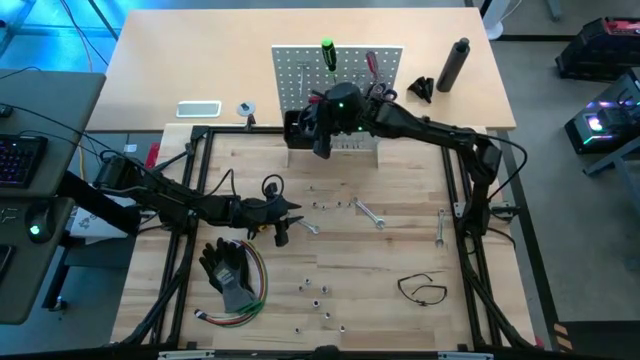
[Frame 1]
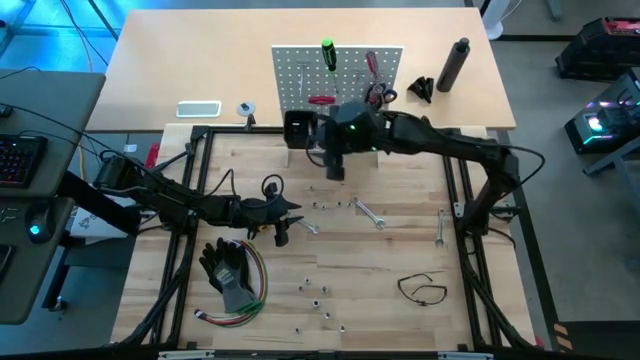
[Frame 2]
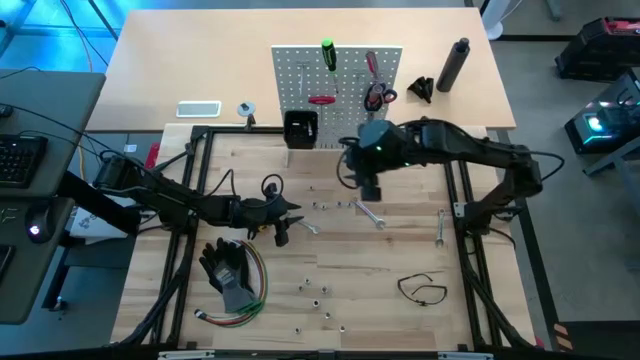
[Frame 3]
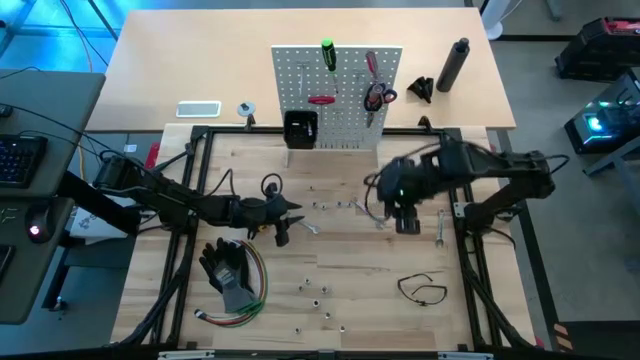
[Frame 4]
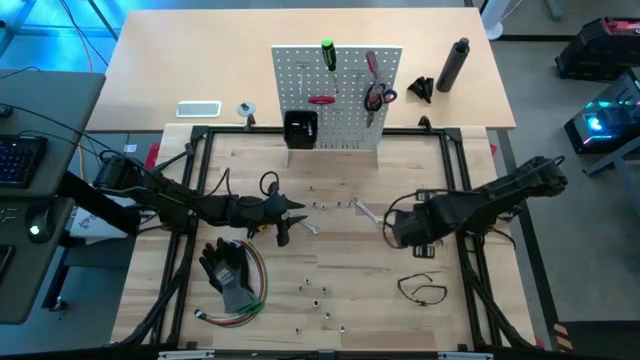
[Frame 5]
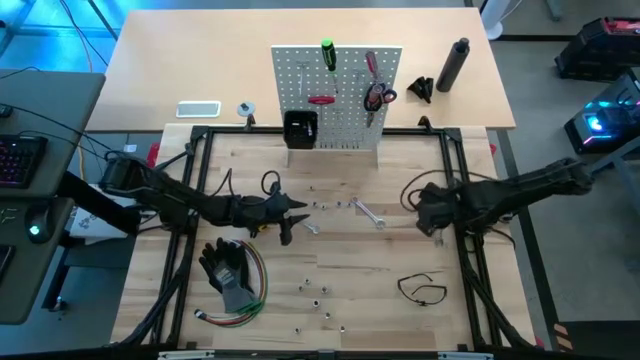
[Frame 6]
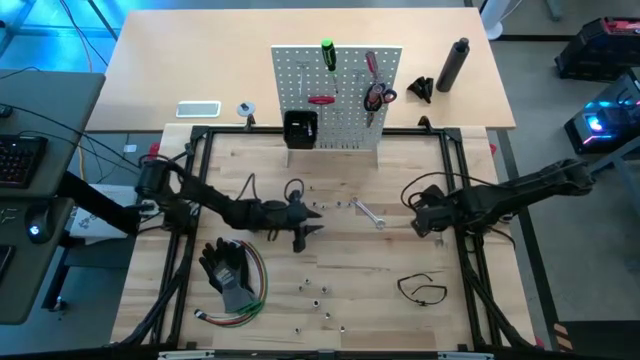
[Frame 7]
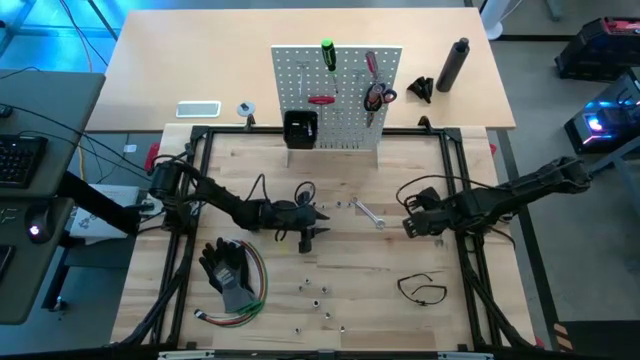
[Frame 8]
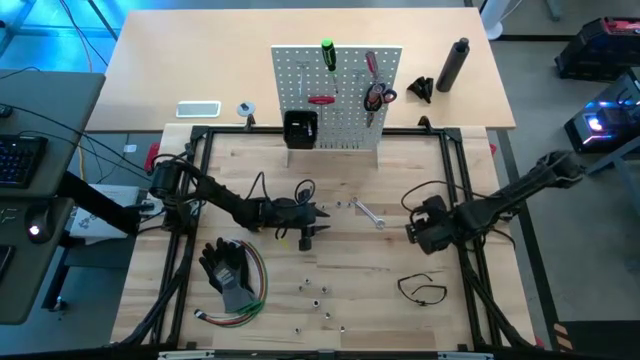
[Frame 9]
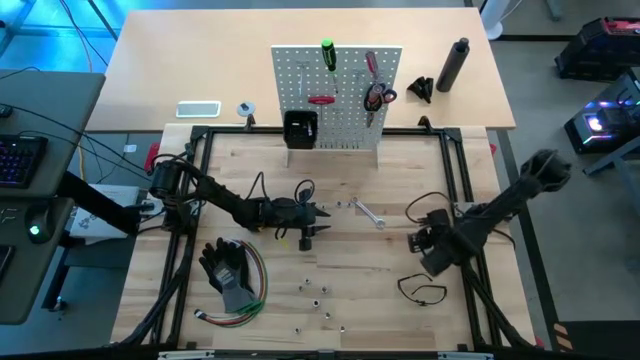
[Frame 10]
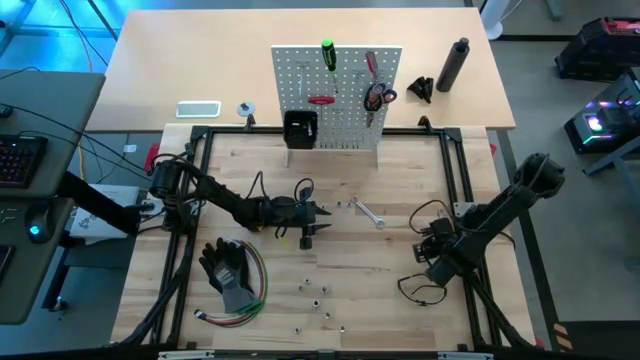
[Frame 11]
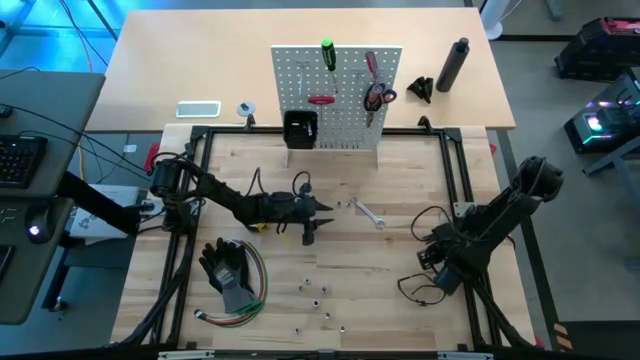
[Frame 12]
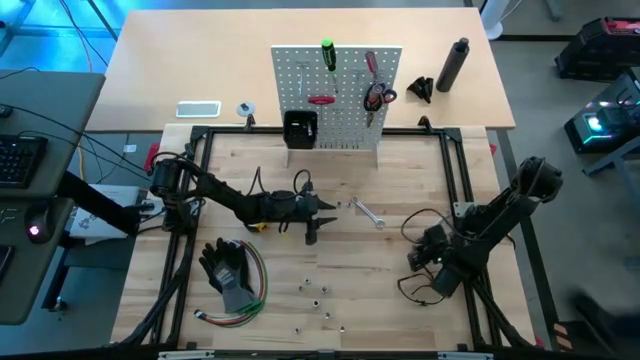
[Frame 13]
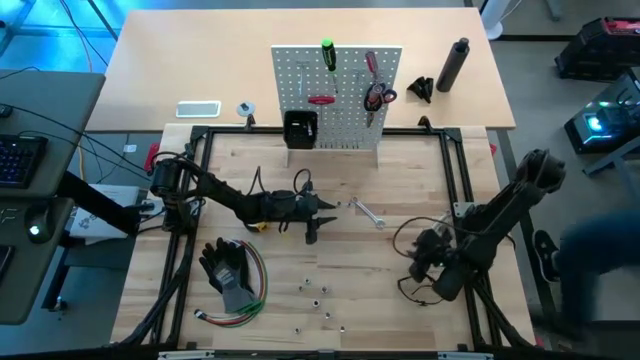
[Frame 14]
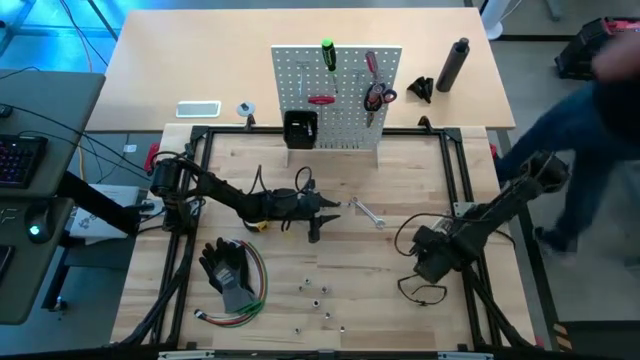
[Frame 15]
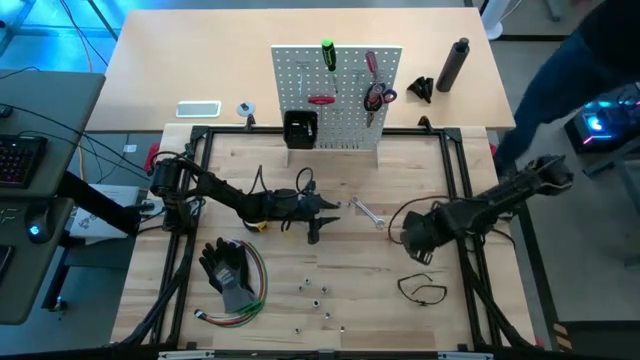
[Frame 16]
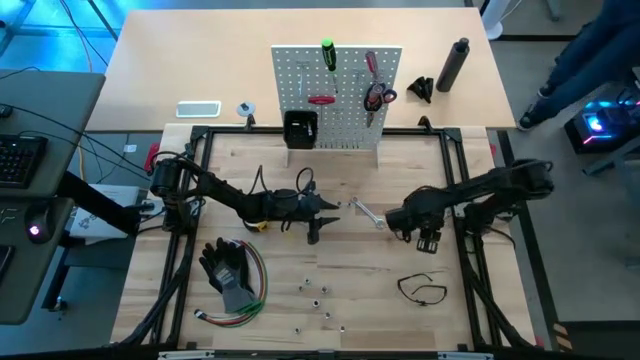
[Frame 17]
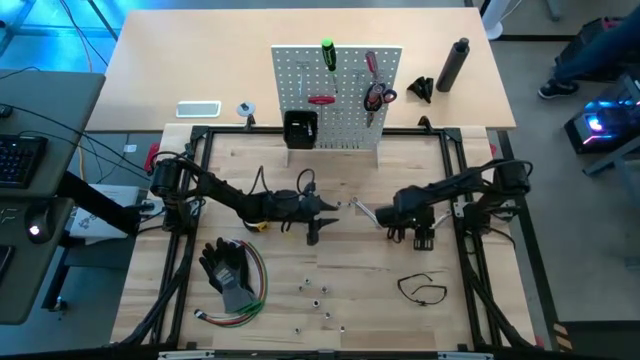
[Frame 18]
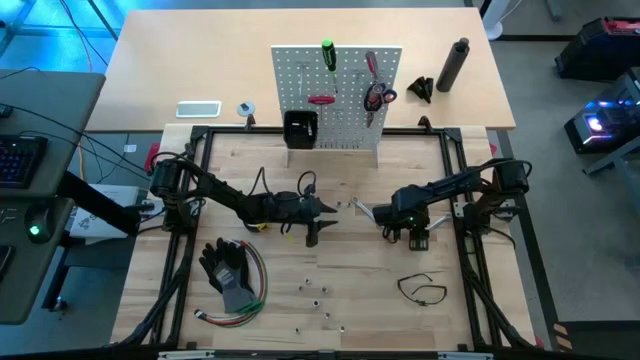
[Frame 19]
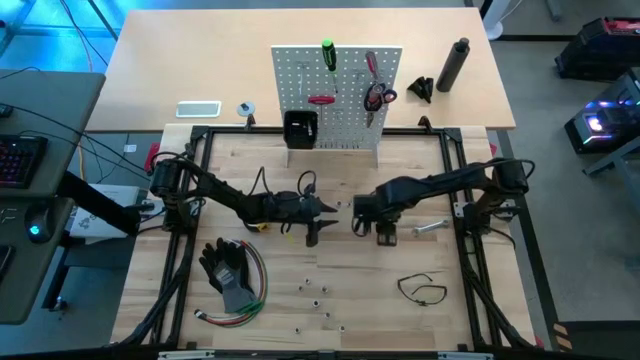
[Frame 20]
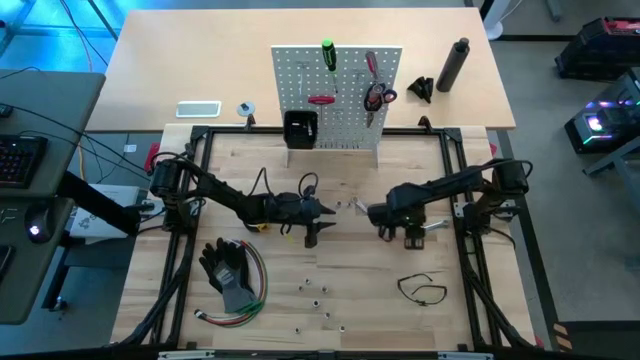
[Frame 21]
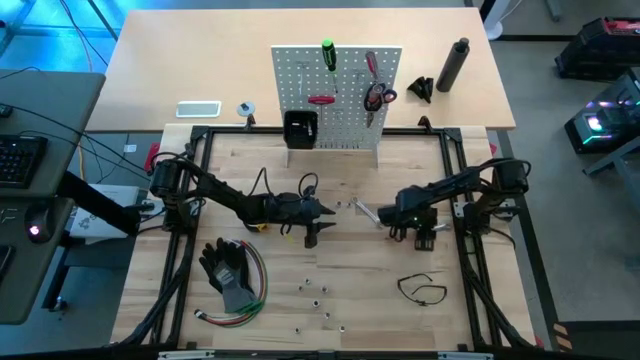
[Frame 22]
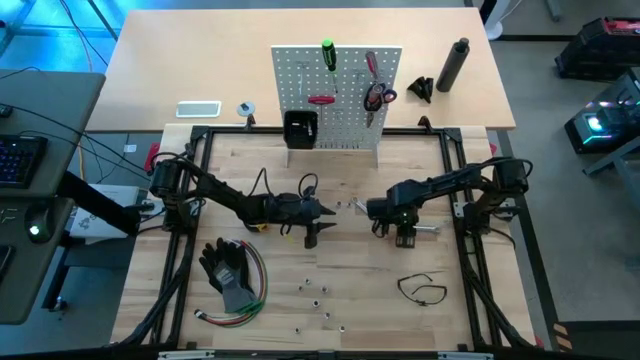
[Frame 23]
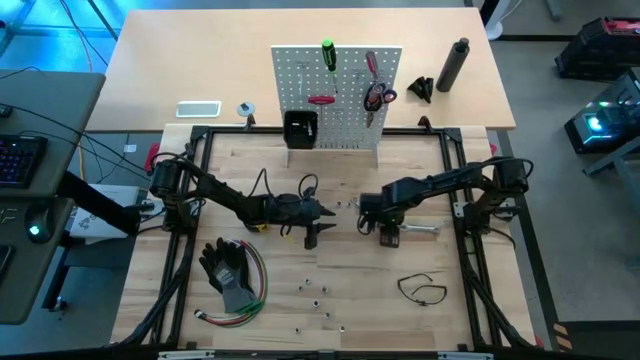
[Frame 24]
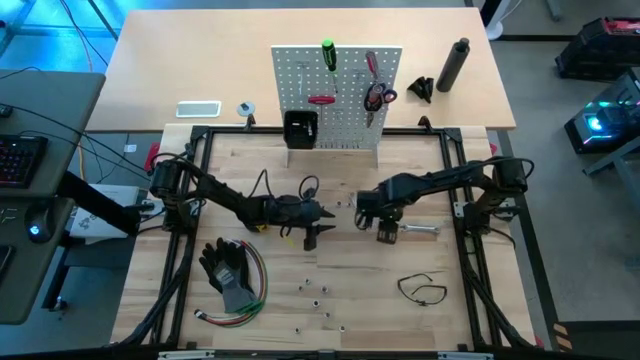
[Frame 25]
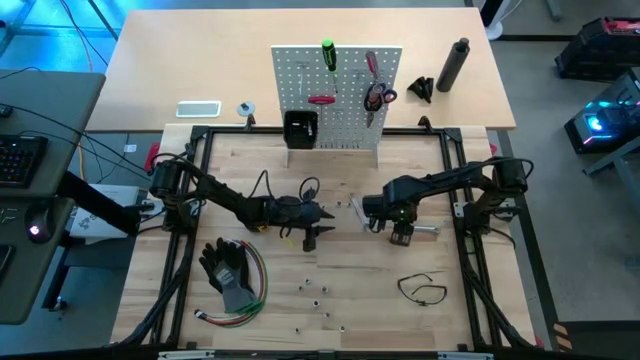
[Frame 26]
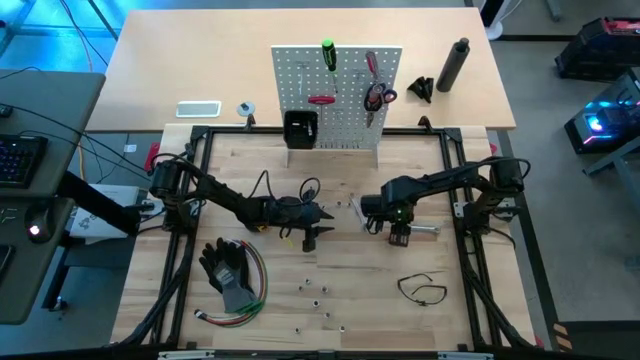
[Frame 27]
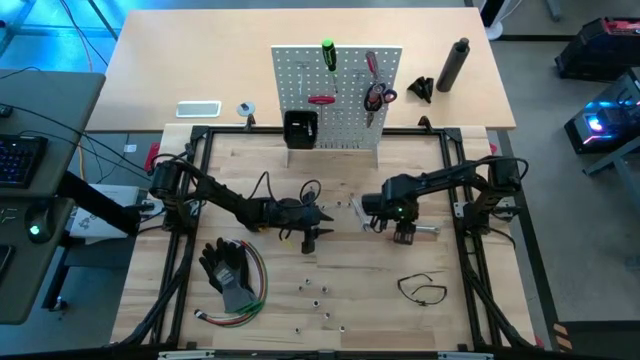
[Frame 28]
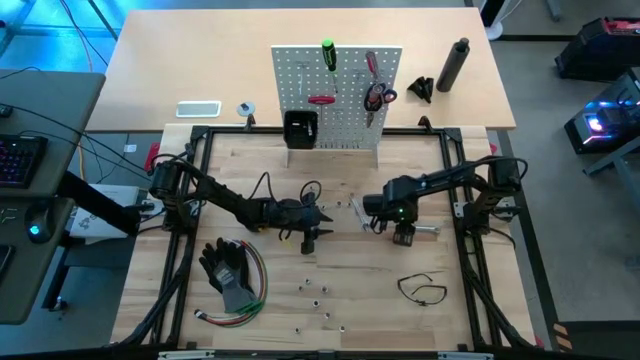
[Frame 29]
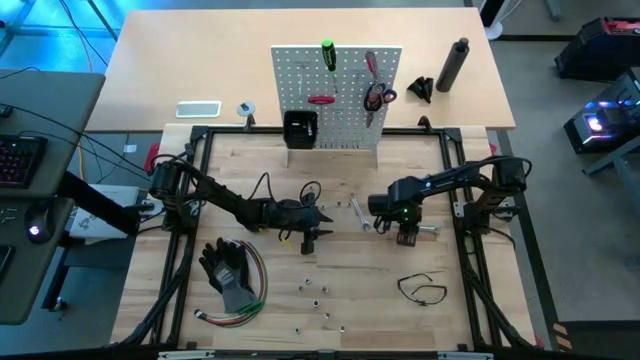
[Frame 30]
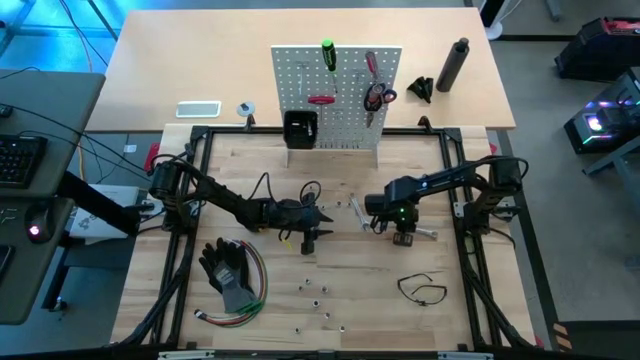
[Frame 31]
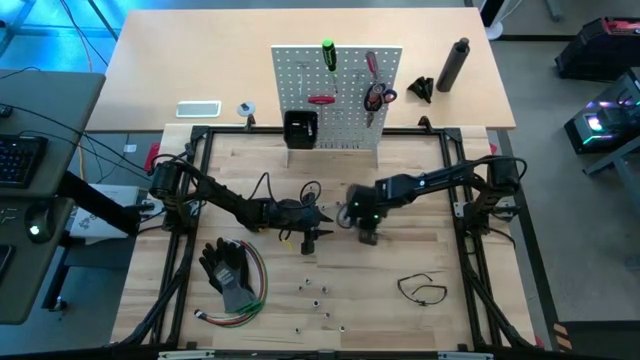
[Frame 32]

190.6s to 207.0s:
Task: Hang tools onto peg board
Hang the right silver wrench on the white peg board

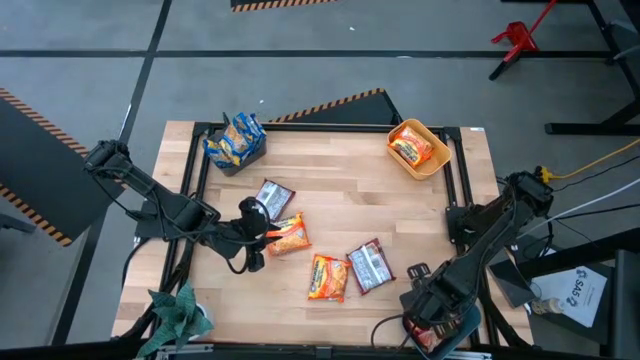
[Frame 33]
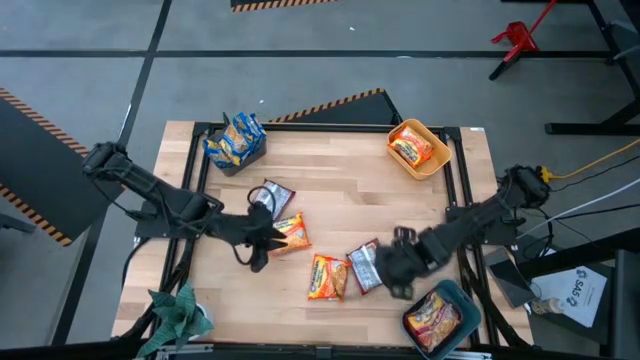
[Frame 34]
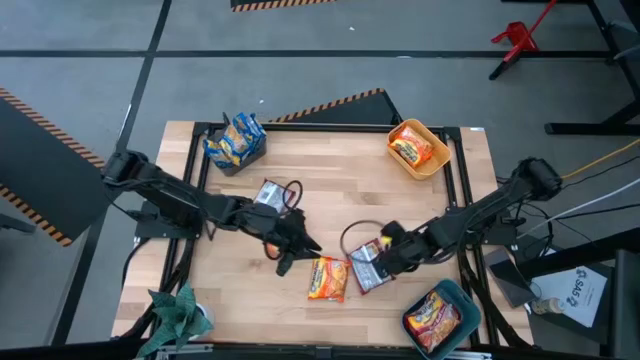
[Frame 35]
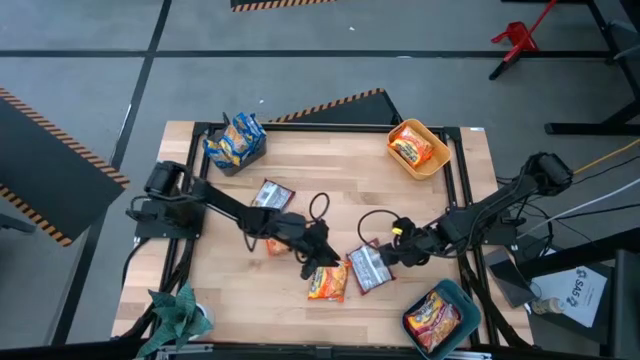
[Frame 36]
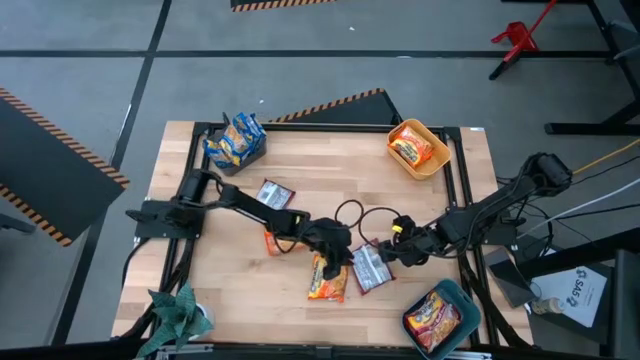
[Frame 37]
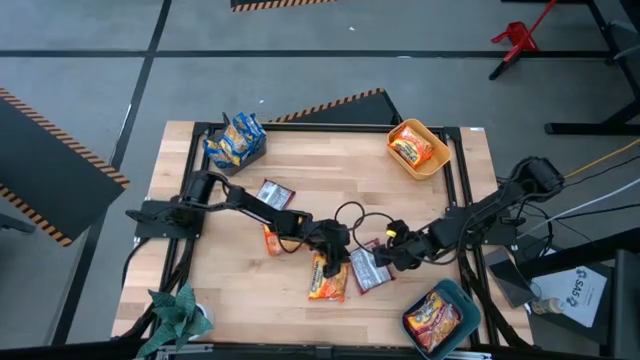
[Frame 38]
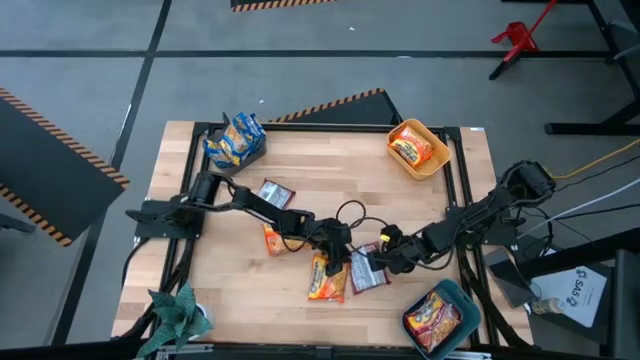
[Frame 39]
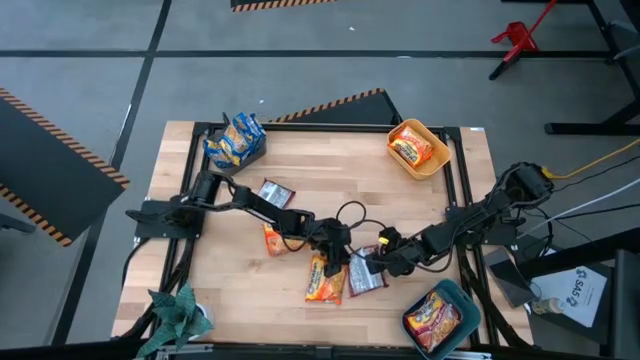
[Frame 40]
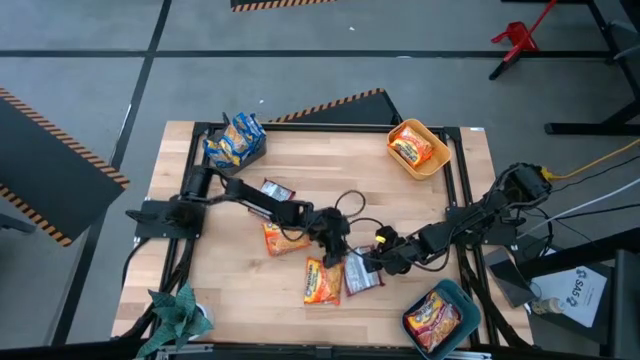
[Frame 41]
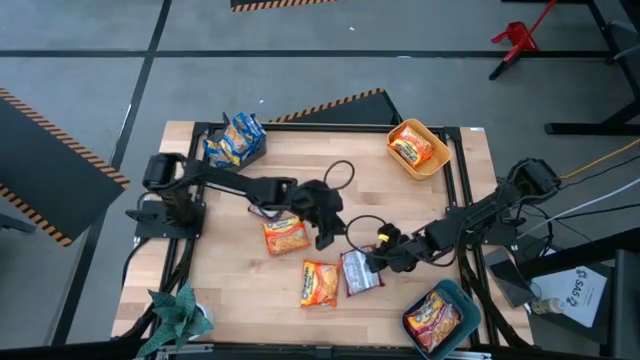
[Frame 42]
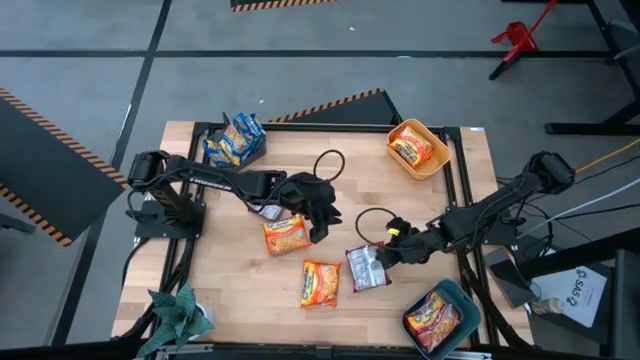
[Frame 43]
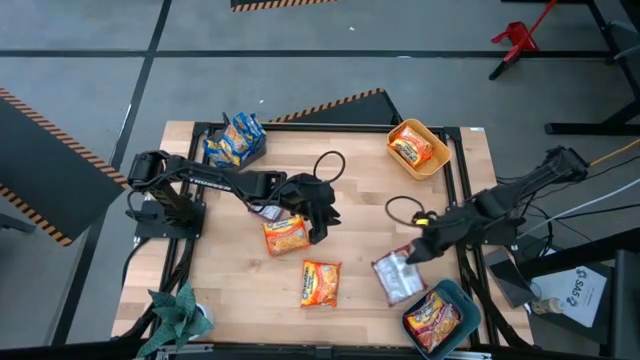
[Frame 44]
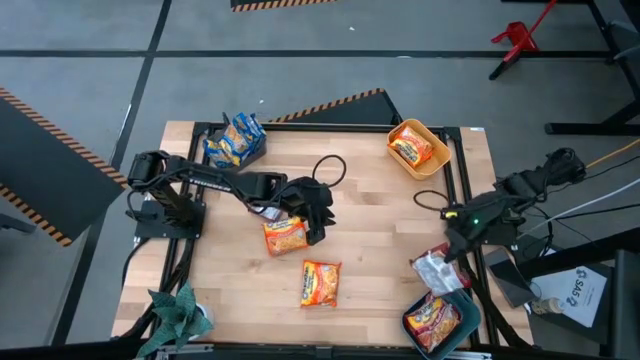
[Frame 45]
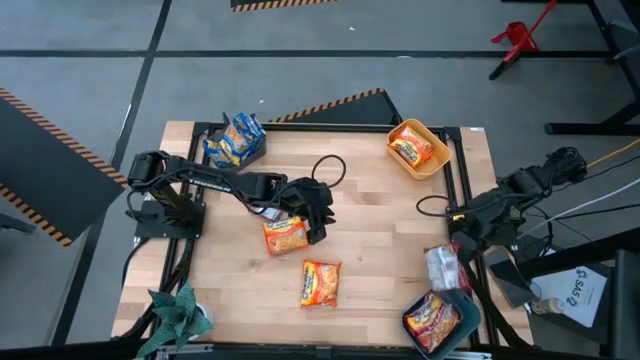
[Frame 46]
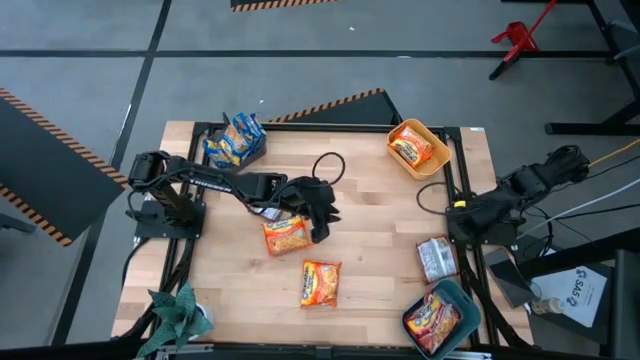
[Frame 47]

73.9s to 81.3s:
Task: Sort Maruchan noodles
Put the red noodle pack into the blue bin
